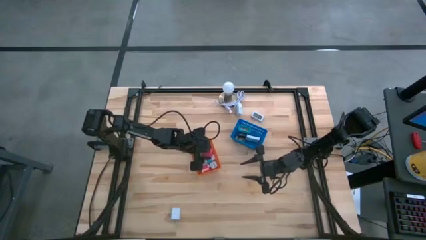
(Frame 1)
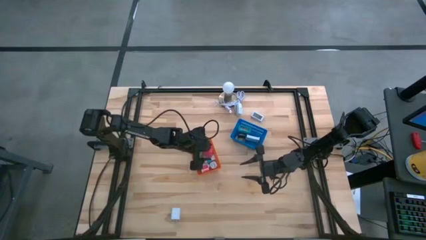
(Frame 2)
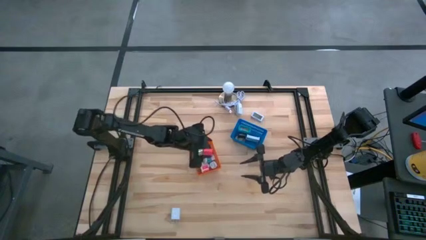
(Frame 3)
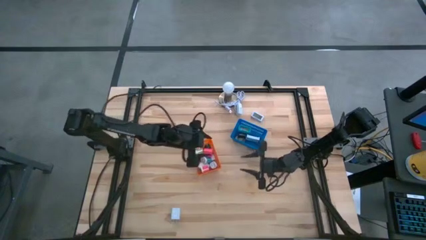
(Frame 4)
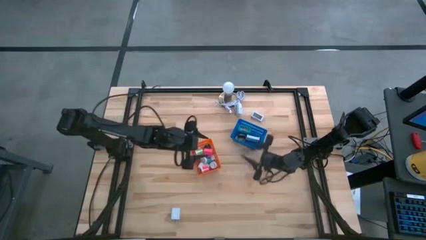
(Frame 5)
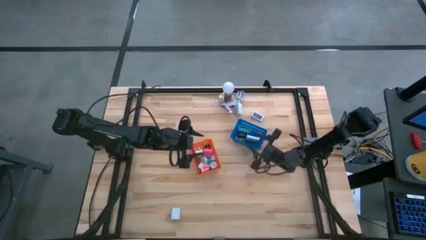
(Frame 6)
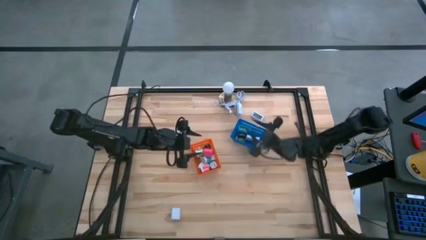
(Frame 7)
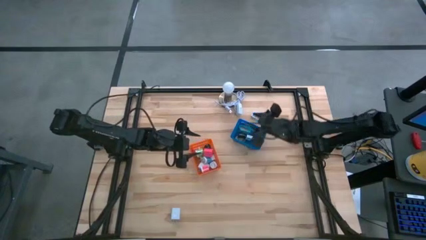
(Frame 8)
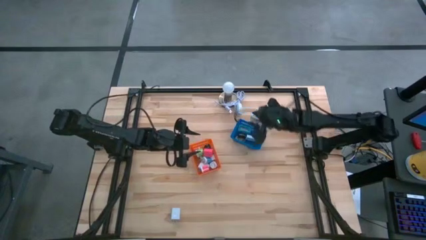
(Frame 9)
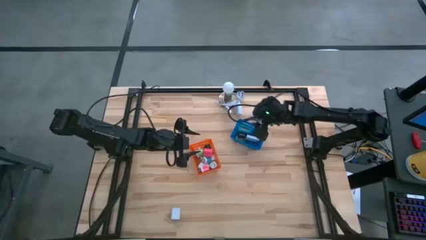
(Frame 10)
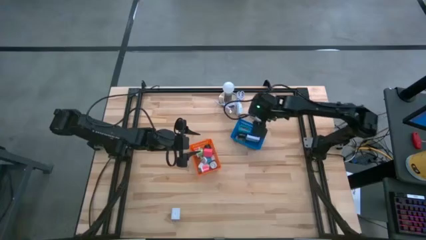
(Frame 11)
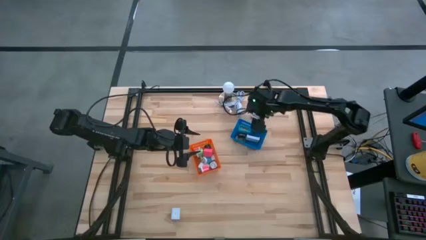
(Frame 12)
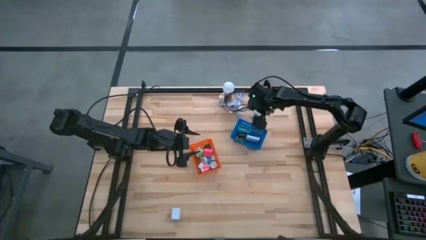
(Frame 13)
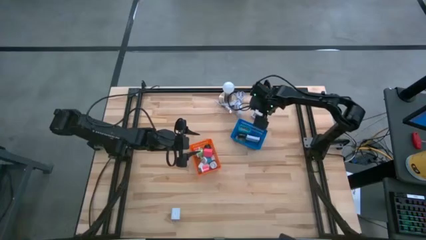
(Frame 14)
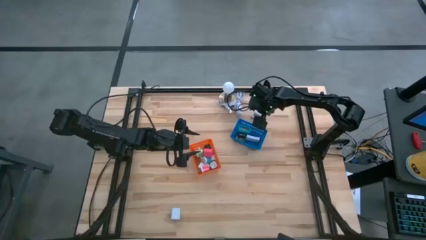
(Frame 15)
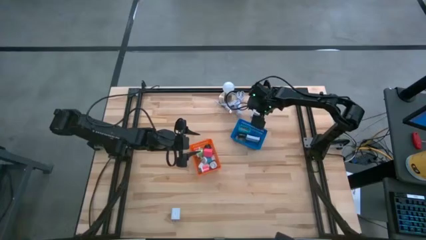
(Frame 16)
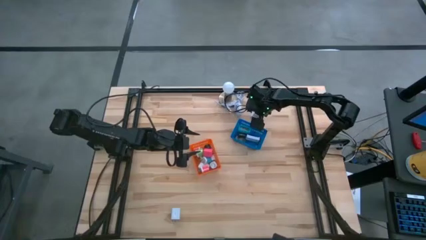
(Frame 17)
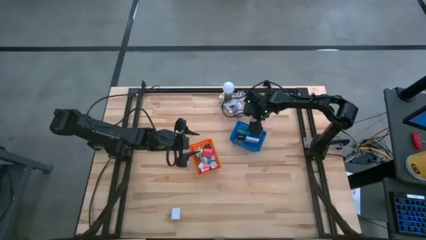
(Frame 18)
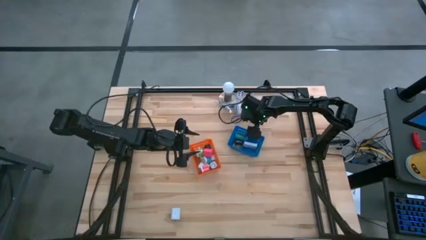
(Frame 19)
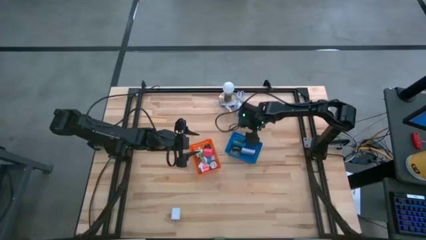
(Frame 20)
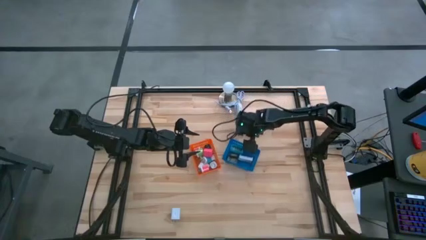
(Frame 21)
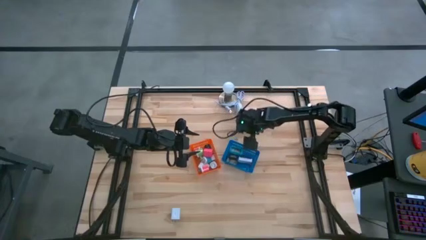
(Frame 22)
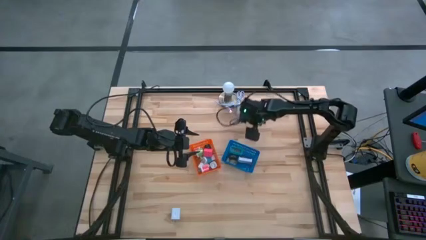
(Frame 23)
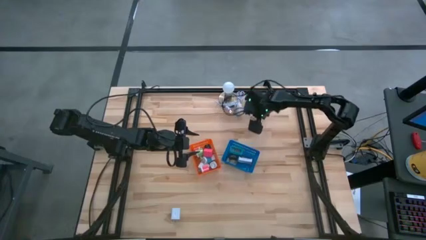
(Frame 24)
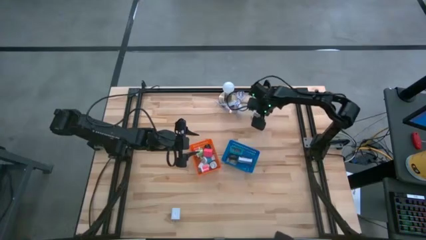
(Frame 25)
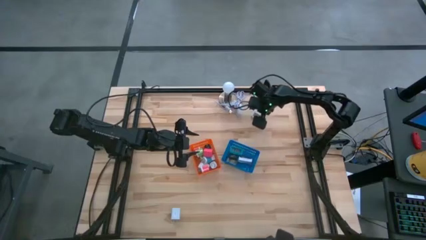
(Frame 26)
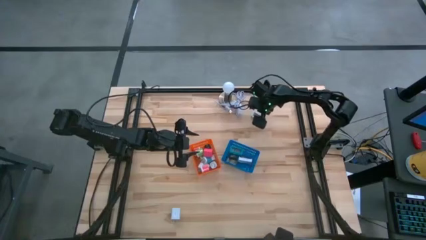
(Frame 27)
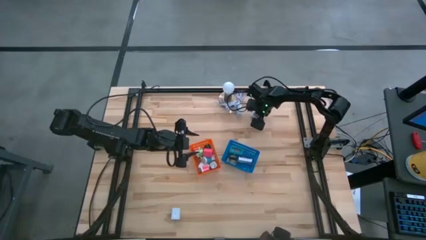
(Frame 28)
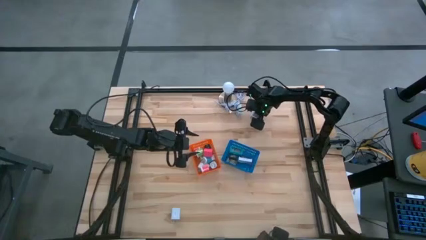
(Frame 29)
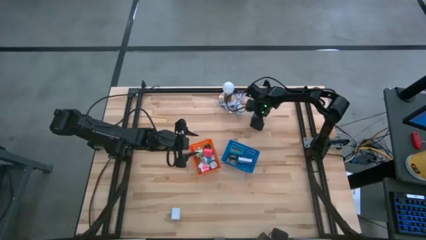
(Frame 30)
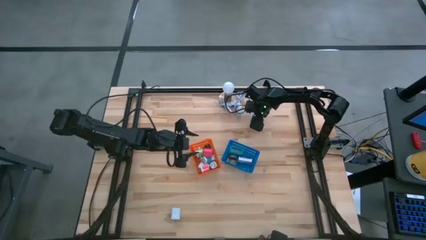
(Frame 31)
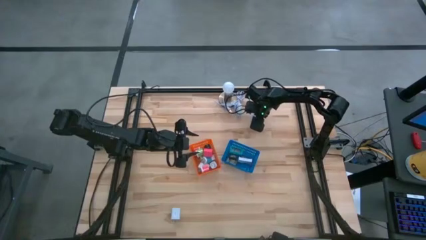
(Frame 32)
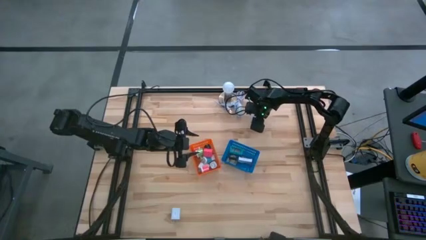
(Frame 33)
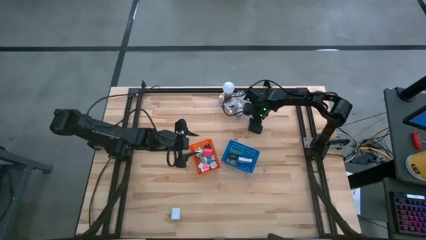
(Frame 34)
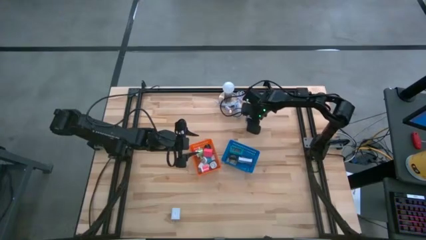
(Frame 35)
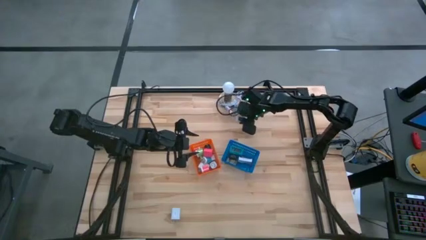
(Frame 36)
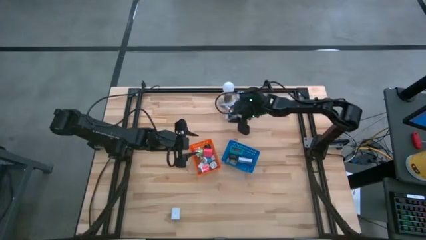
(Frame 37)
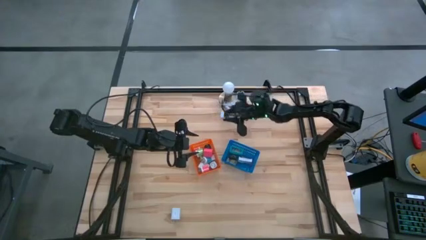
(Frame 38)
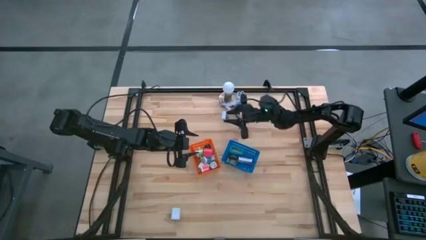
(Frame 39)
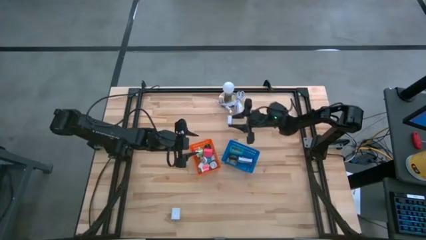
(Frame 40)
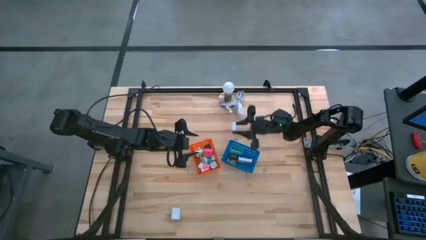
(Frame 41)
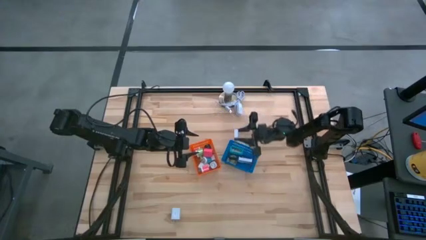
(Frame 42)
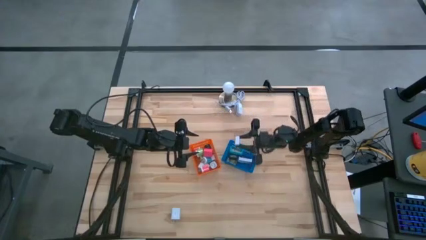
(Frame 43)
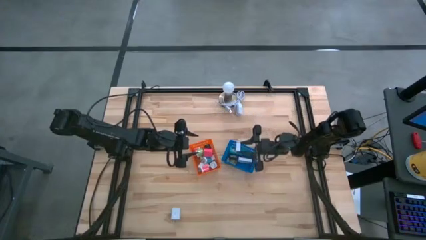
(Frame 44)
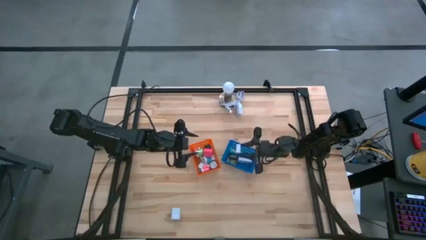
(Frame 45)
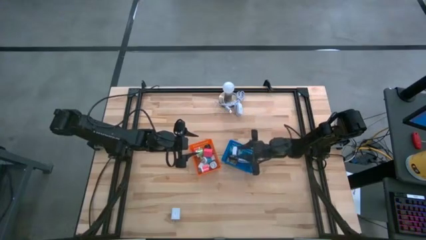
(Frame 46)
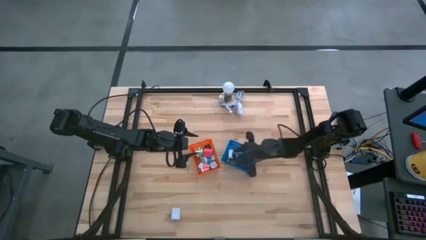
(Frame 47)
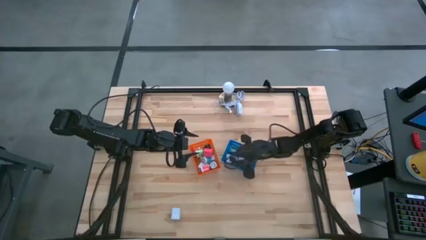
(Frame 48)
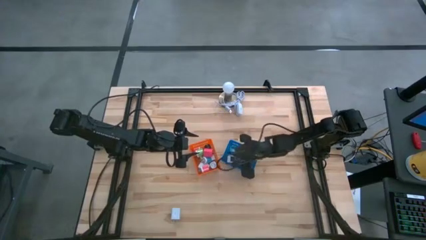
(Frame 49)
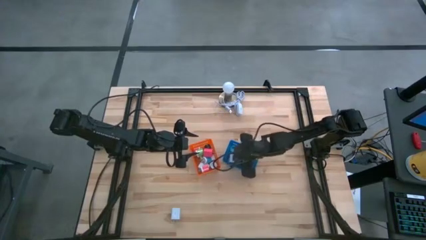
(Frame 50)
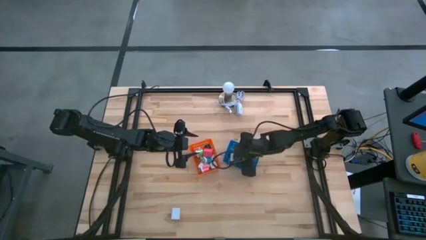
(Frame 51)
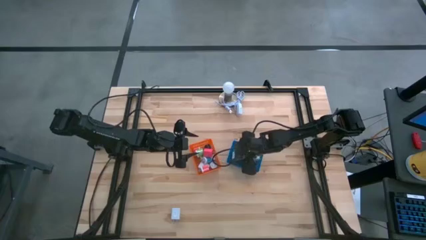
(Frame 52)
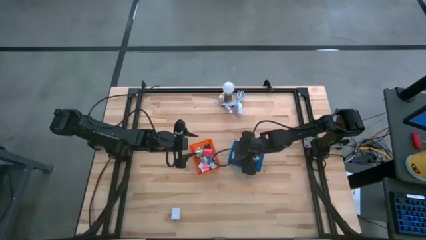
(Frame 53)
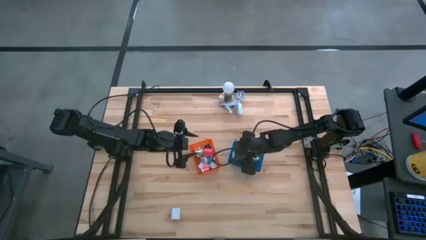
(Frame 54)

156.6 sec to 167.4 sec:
Task: Pick & Place Office items
Put the white digital timer into the blue bin

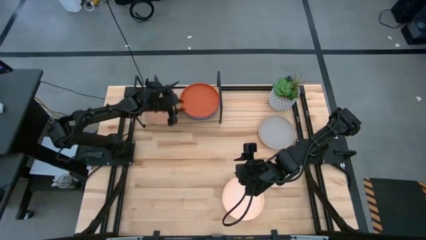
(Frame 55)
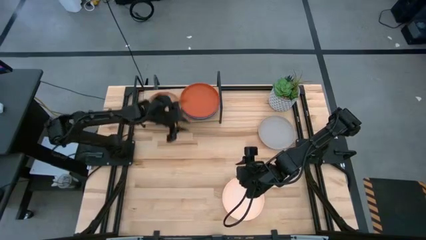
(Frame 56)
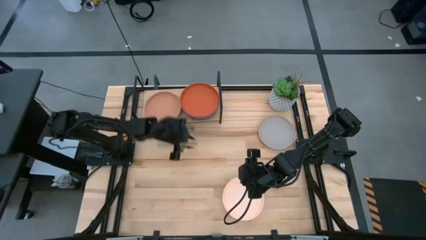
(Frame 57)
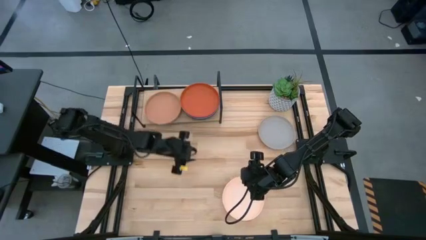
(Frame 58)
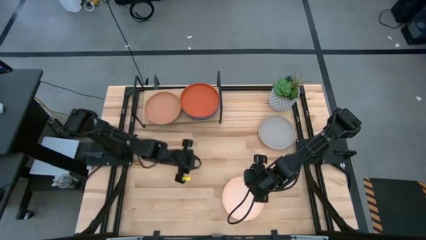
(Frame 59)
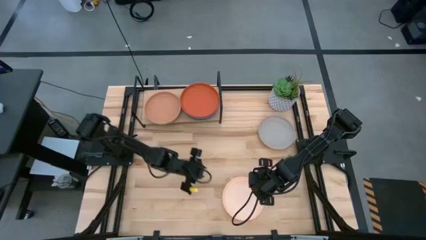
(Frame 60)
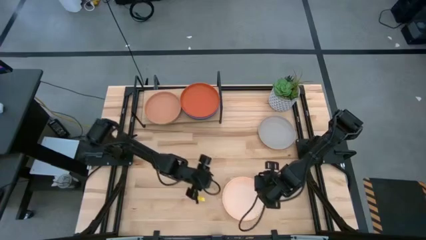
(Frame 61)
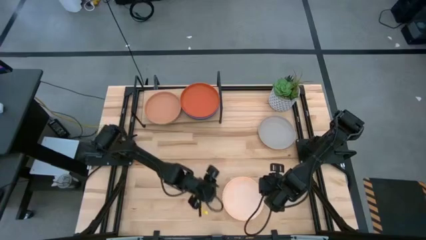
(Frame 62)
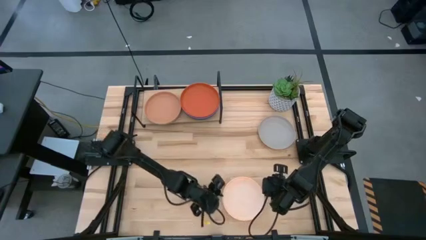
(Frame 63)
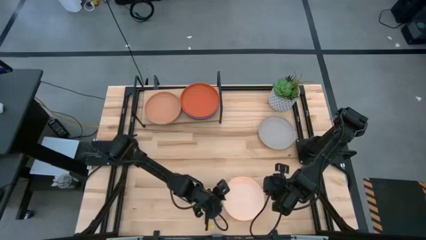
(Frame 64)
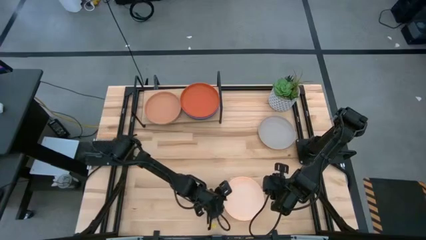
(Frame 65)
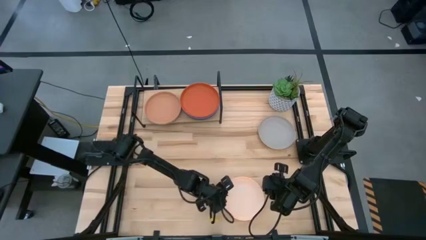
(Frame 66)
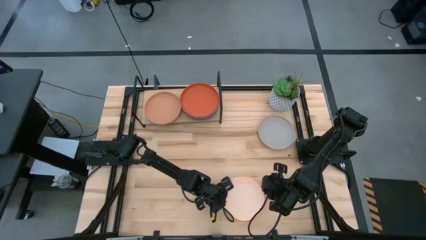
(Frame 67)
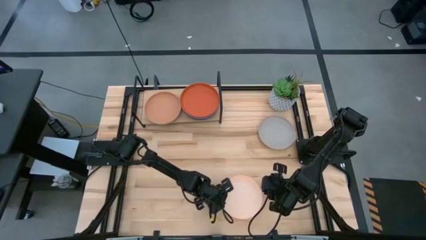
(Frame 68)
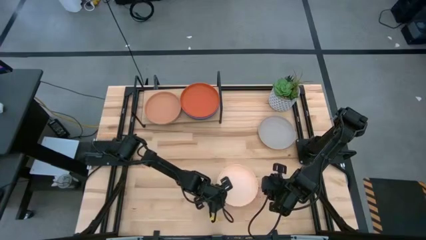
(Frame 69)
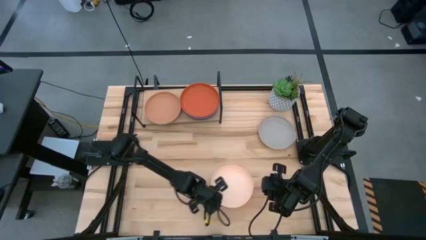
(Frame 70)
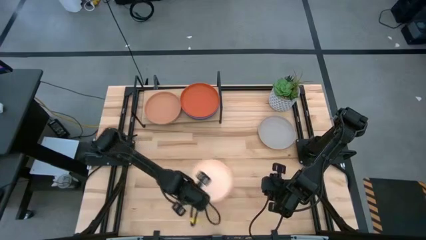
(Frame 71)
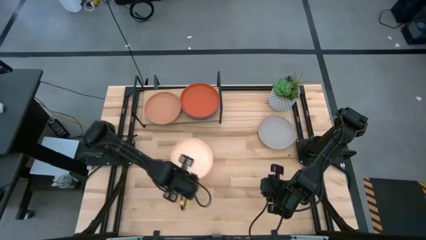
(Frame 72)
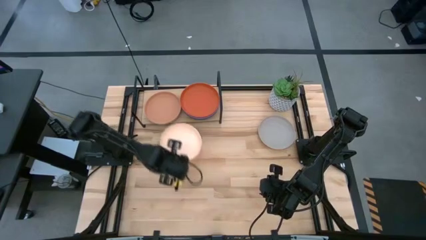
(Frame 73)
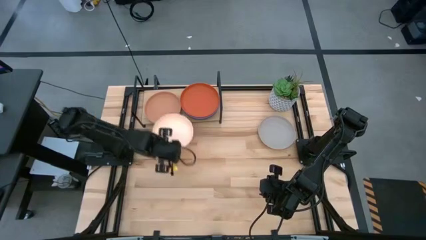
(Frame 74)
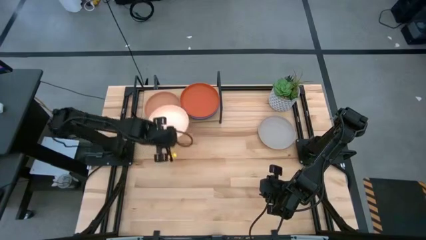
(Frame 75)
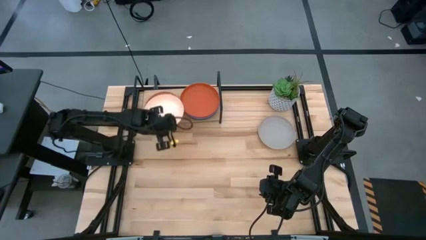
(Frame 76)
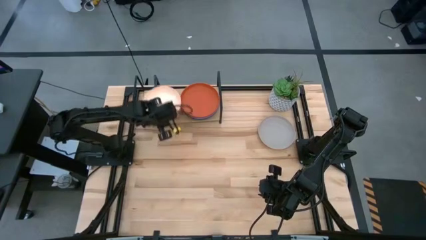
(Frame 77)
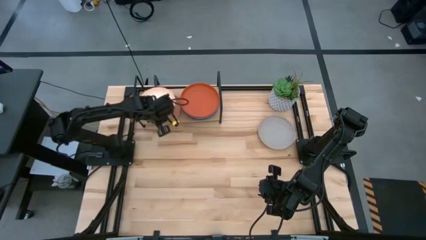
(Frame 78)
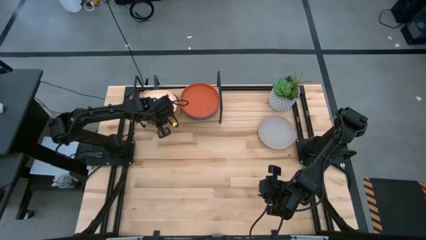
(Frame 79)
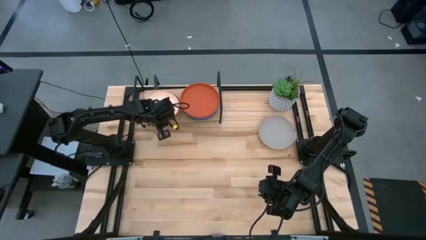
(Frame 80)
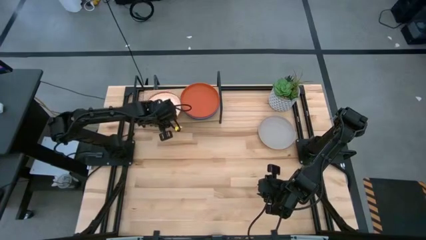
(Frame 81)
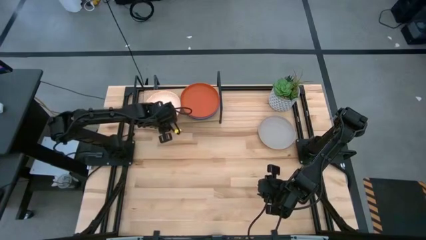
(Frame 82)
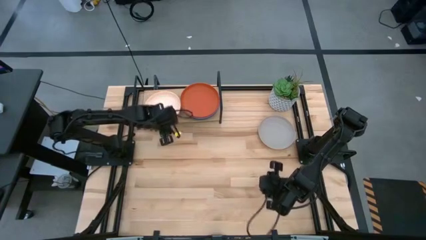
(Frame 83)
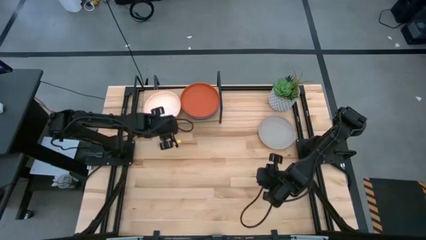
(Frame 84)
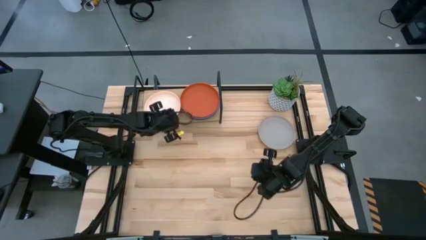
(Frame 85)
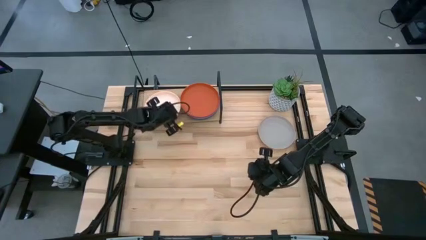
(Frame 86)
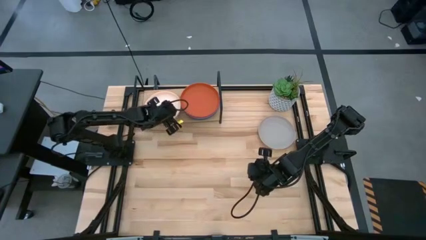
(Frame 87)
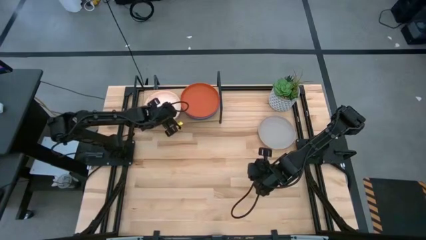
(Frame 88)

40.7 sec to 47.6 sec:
Task: Place and stack plates onto a shelf
Stack the peach plate on top of the brown plate on the shelf
